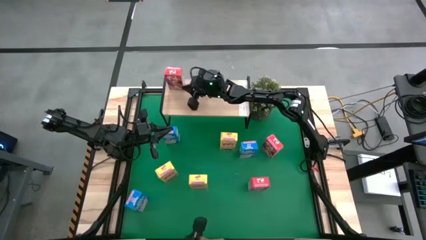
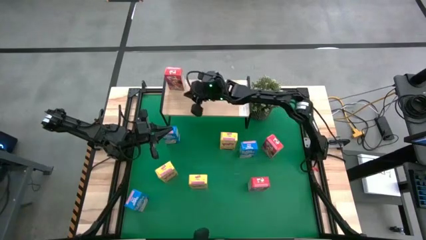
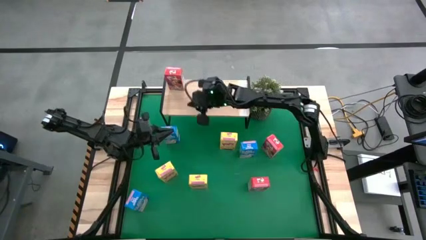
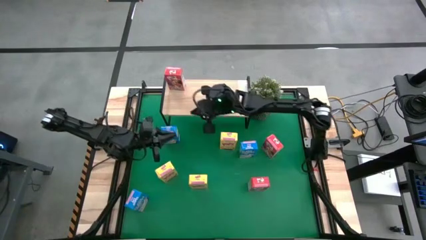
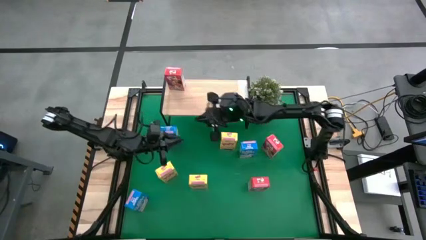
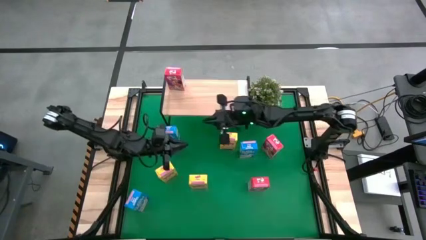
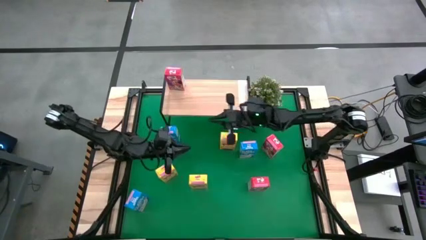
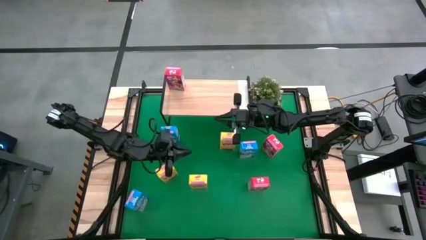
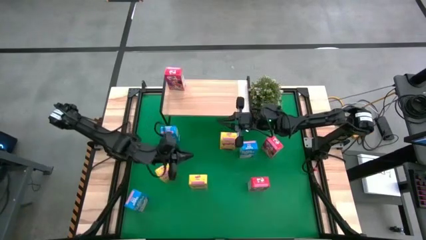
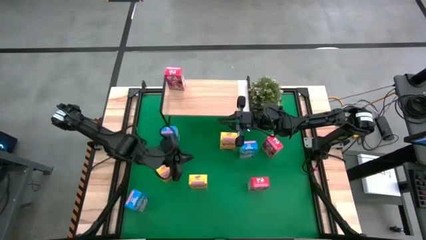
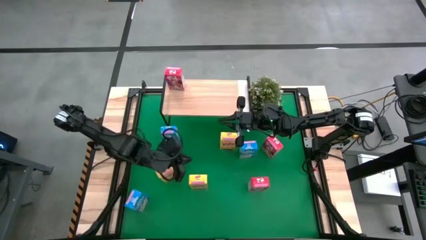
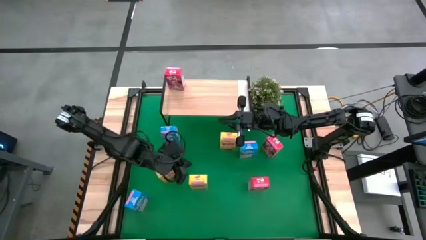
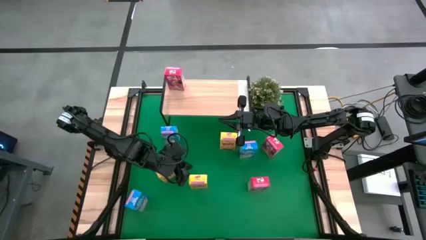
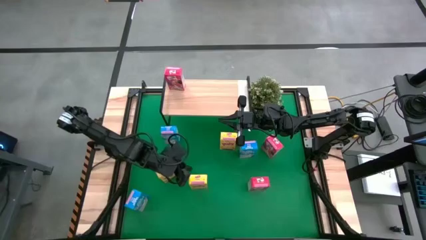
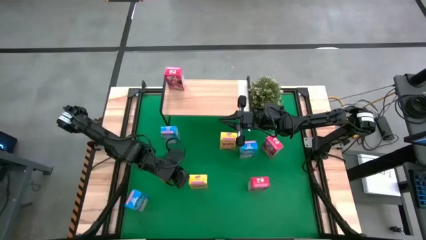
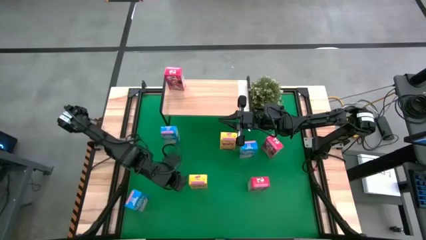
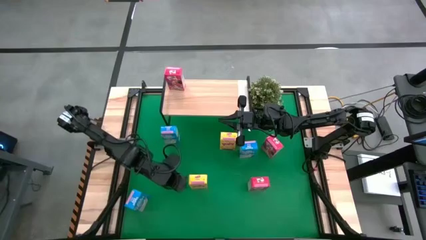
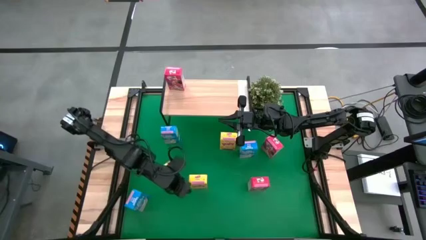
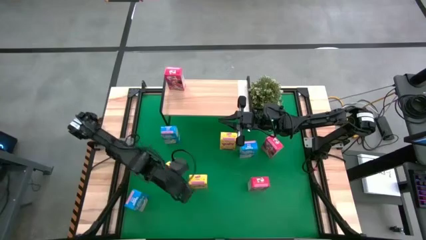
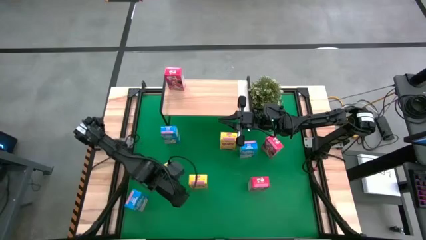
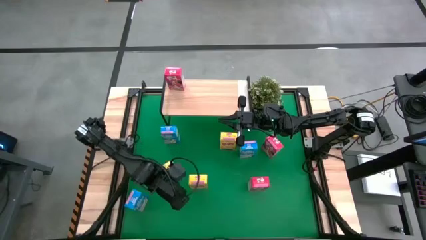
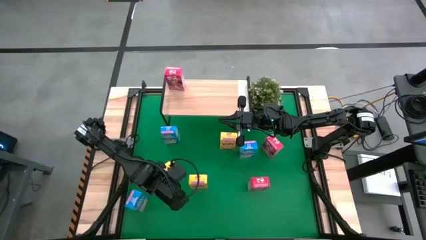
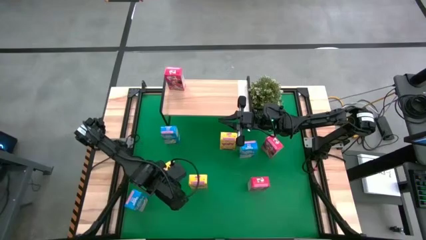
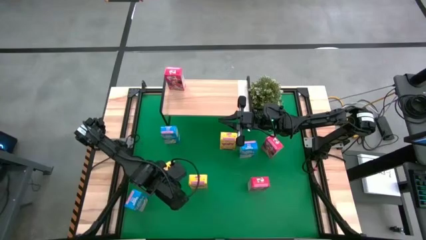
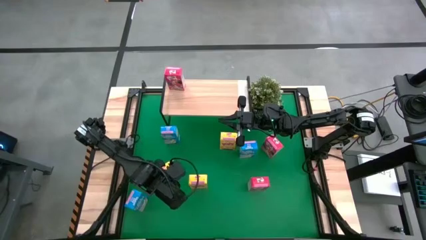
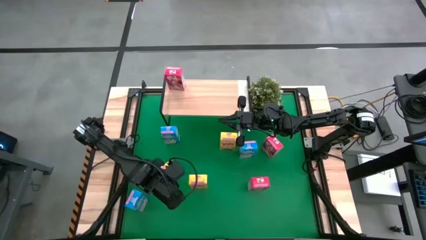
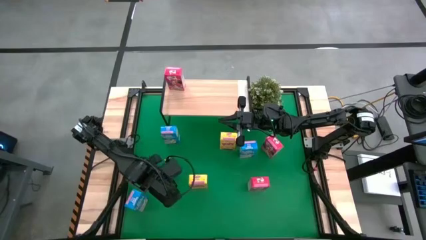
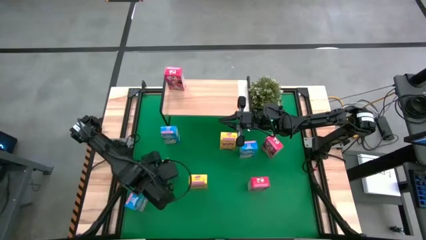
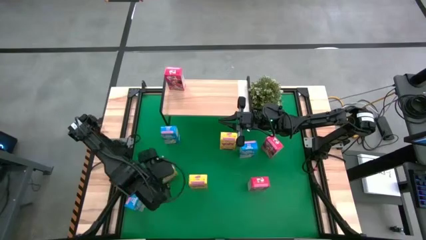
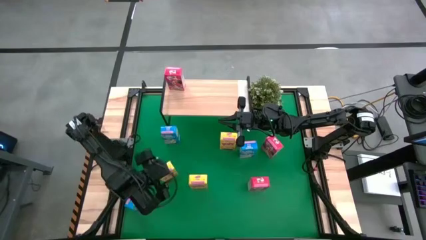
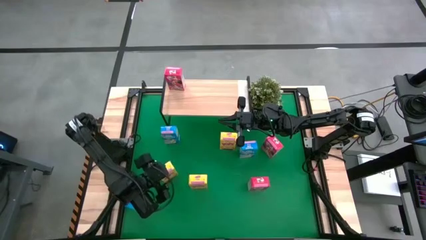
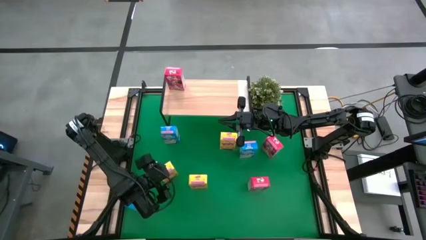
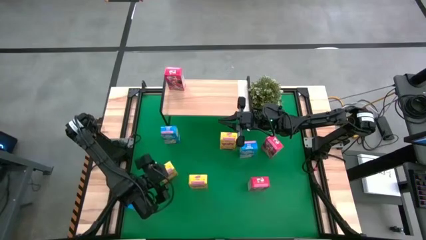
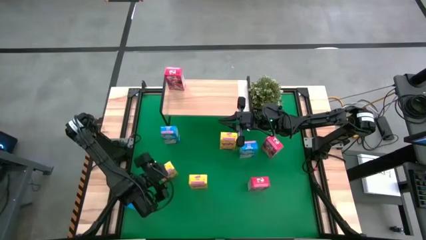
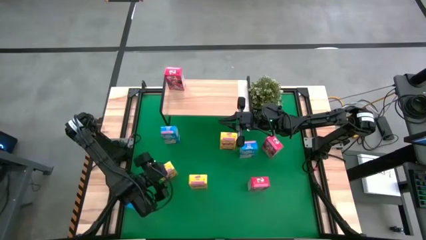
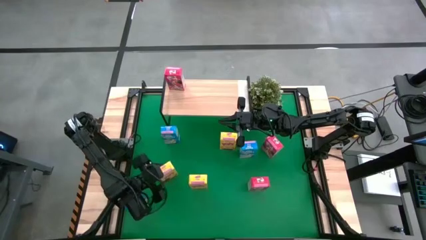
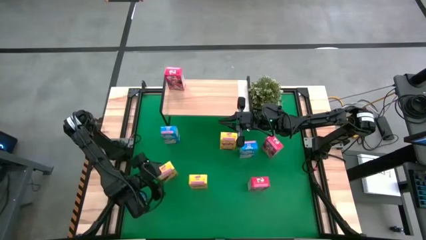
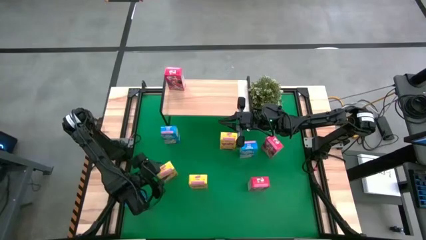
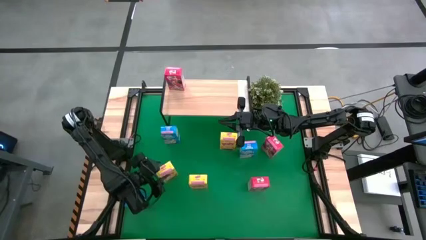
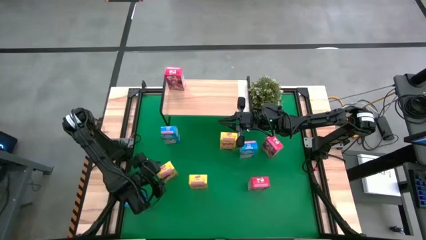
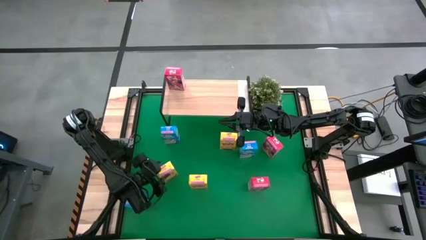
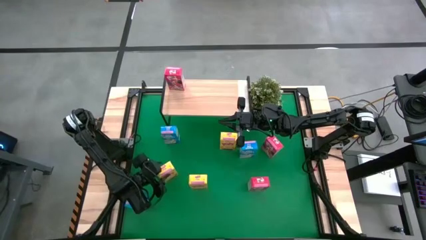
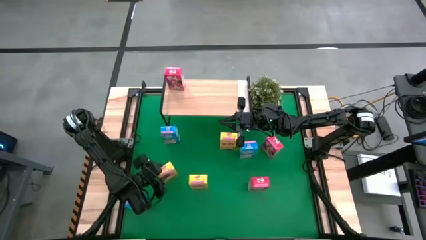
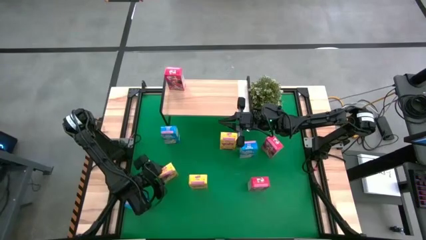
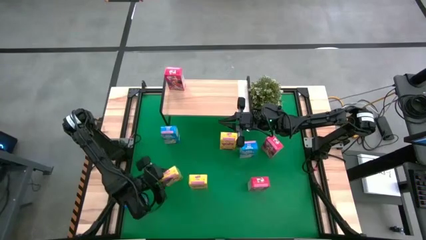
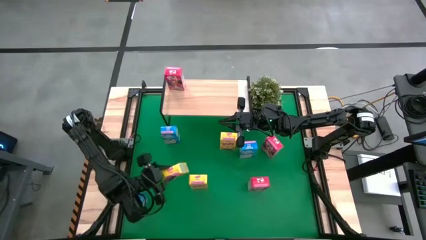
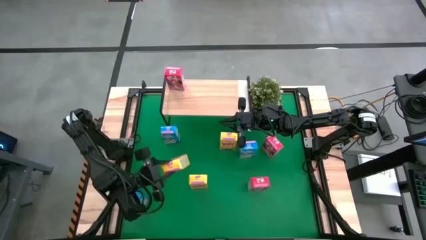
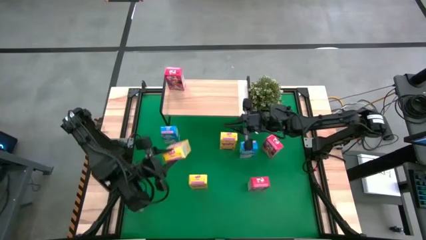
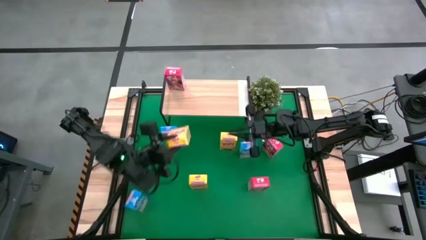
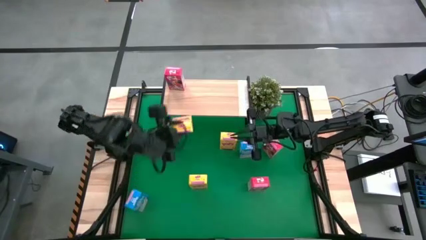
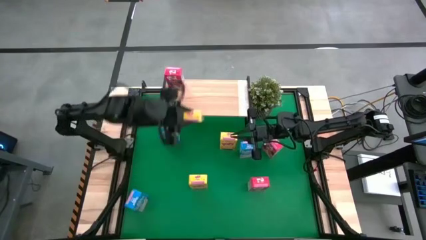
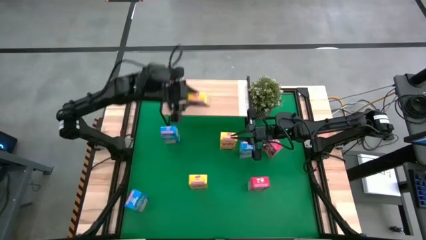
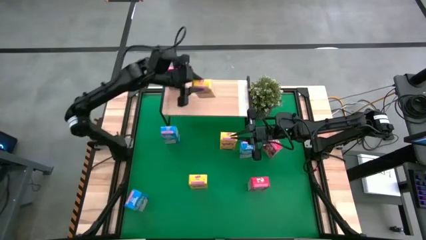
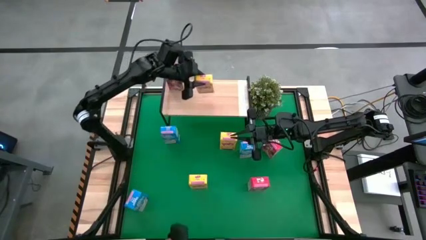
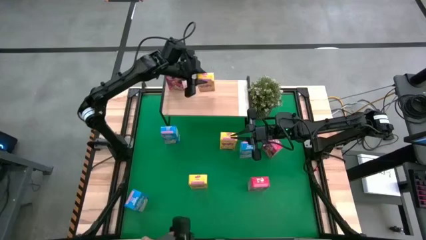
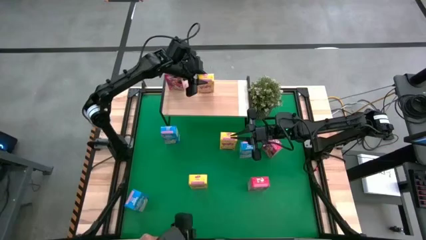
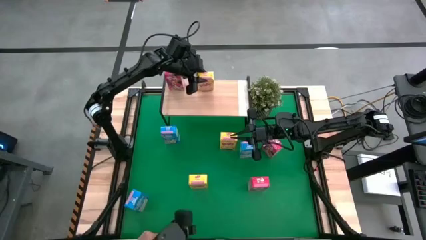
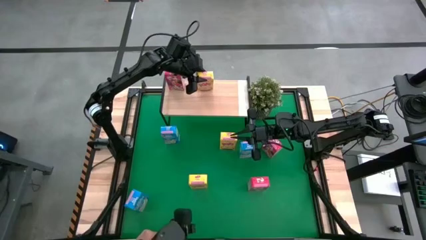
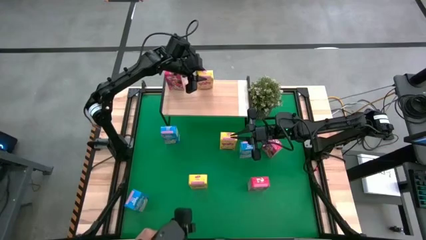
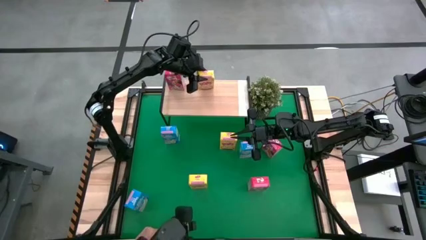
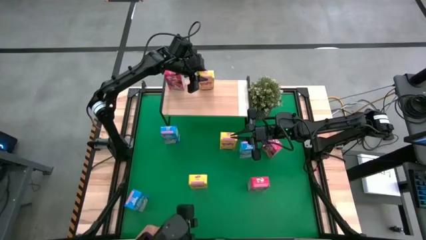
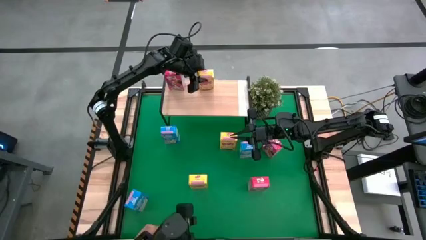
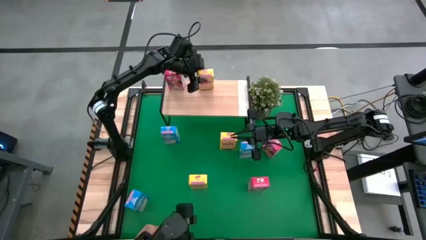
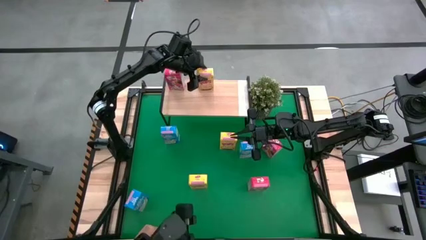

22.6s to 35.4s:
Task: Stack cereal on shelf
Put the bottom left yellow cereal box on the shelf

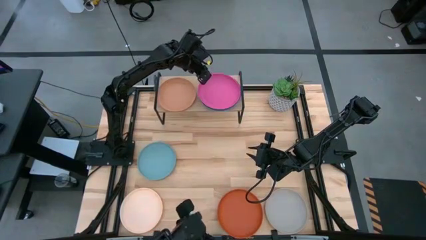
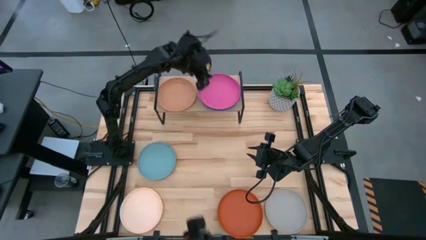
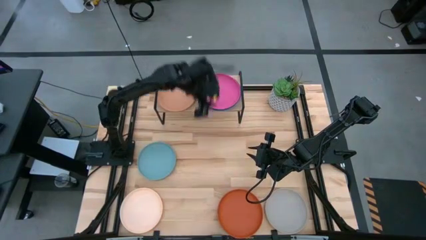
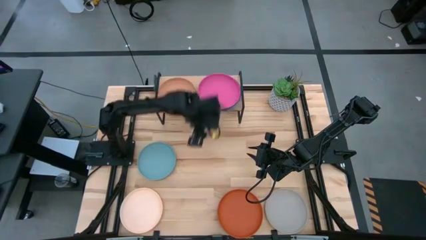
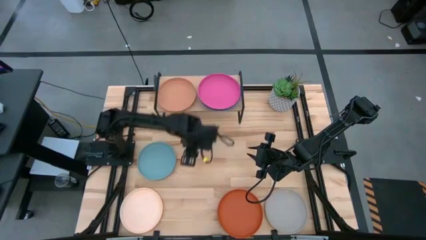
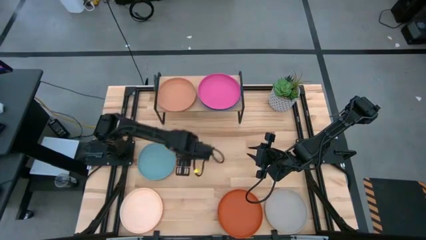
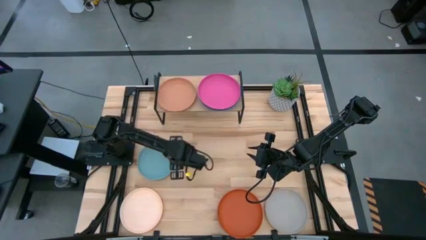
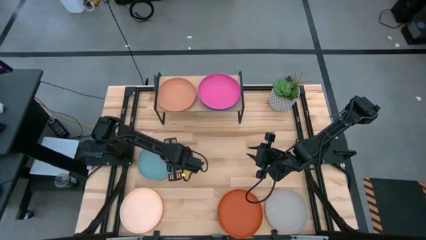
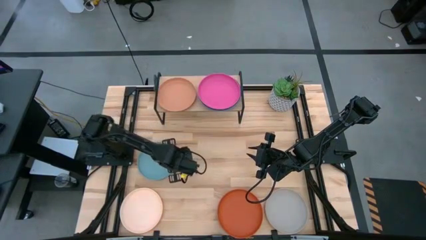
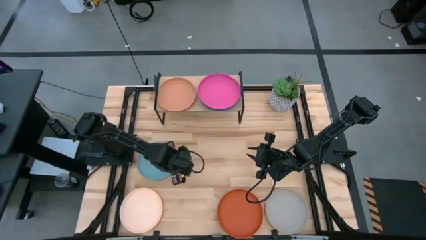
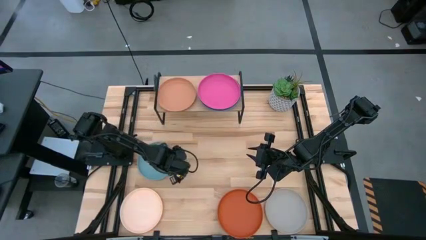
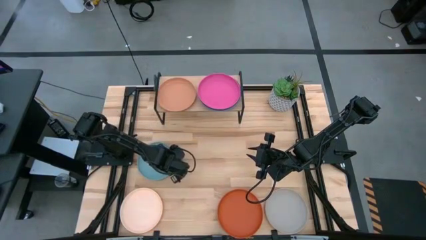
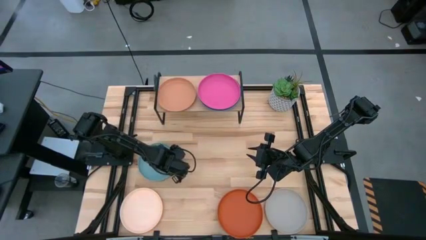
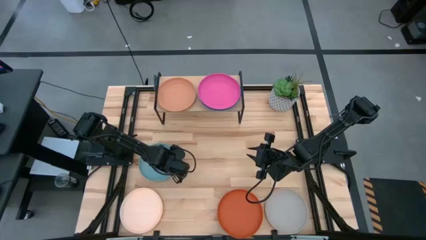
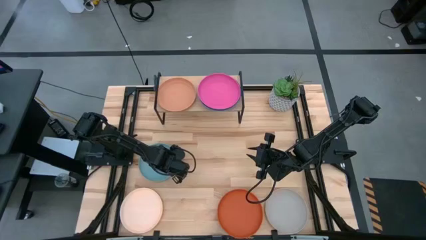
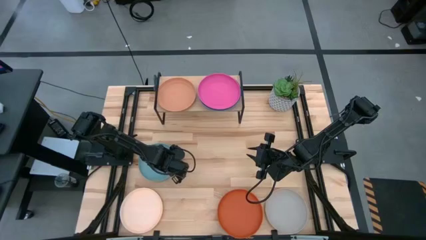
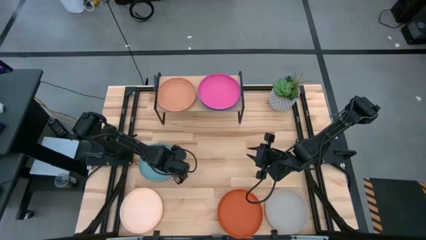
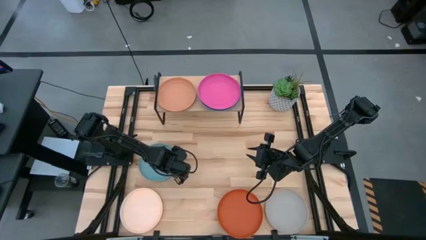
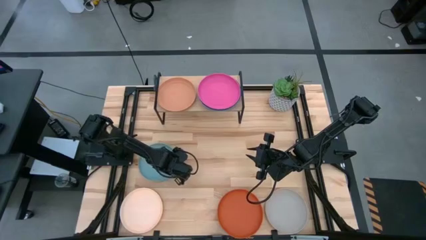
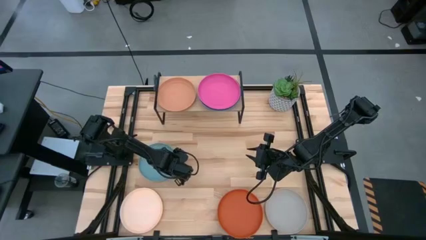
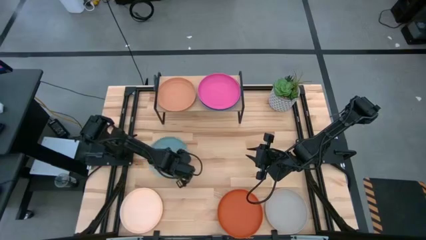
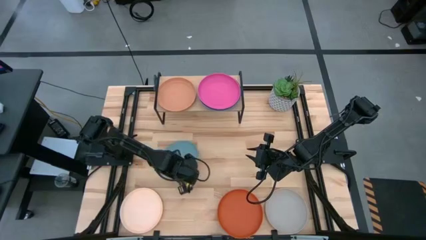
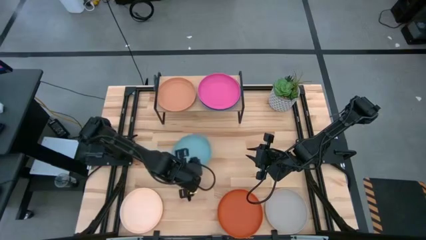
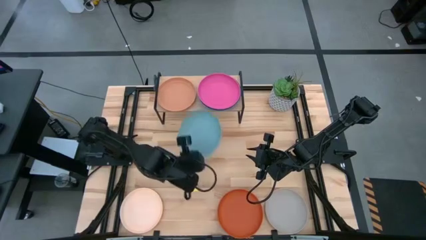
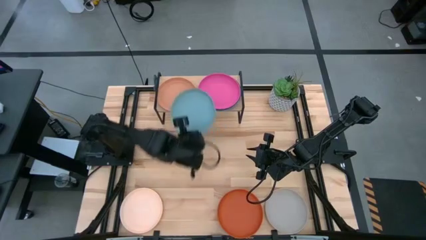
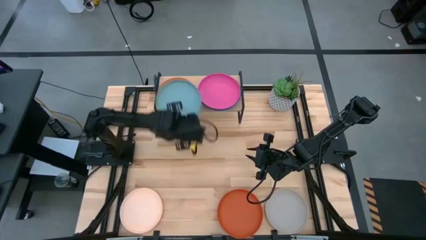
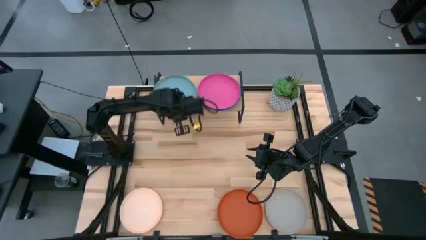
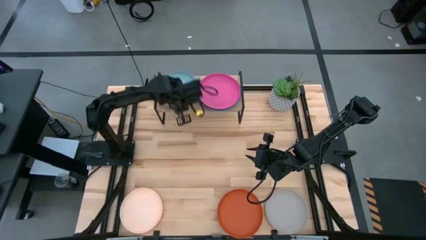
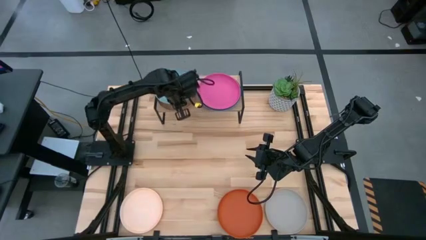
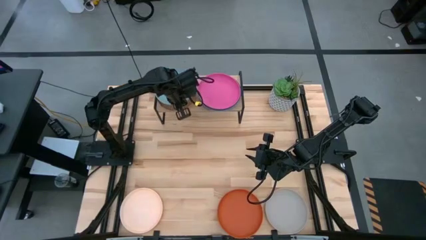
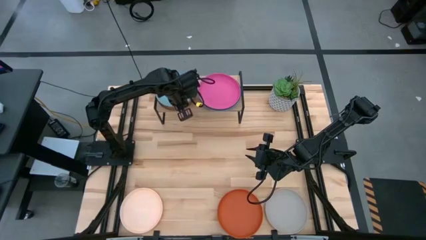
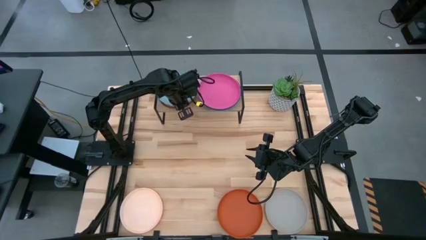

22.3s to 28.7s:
Task: Place and stack plates onto a shelf
Stack the light blue plate on top of the brown plate on the shelf
